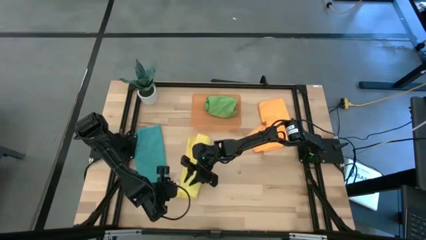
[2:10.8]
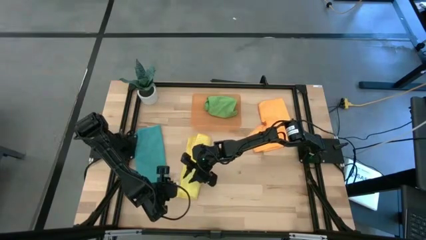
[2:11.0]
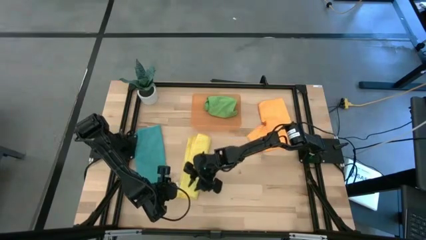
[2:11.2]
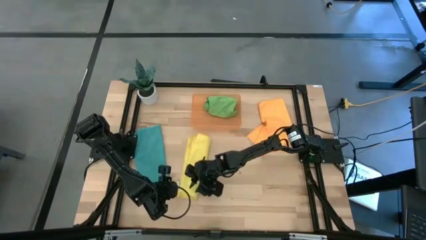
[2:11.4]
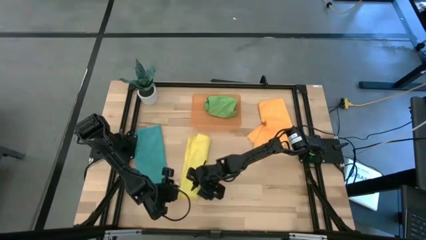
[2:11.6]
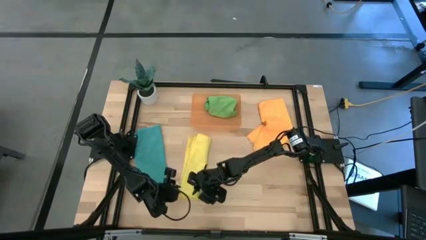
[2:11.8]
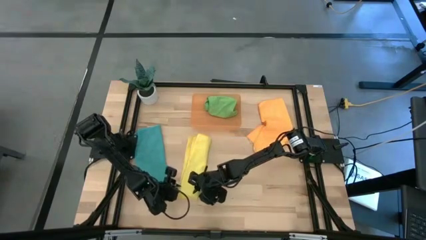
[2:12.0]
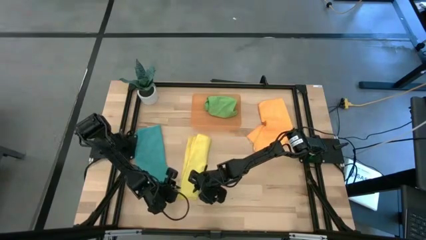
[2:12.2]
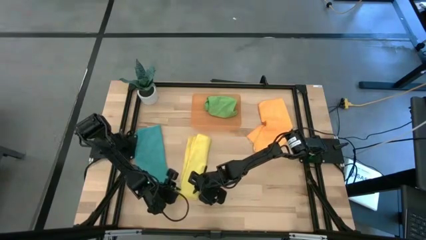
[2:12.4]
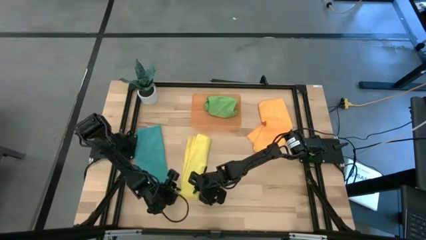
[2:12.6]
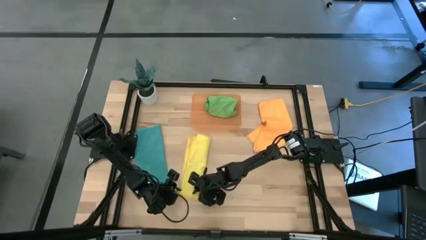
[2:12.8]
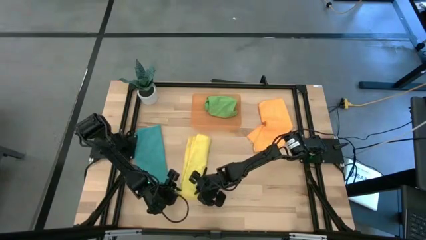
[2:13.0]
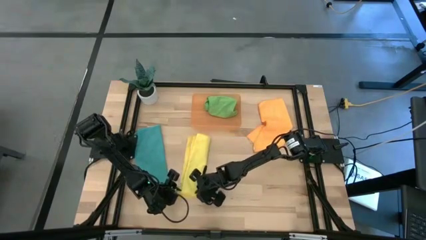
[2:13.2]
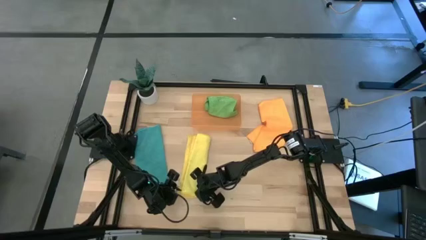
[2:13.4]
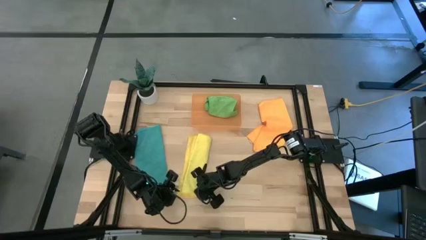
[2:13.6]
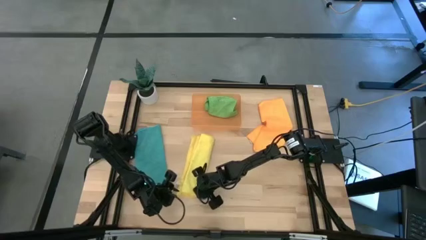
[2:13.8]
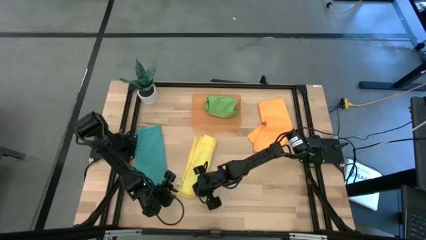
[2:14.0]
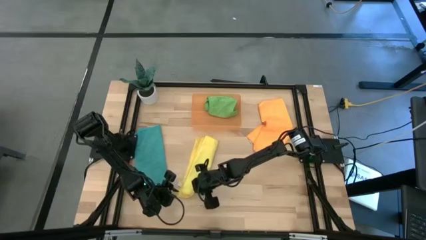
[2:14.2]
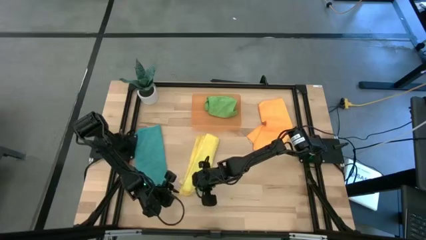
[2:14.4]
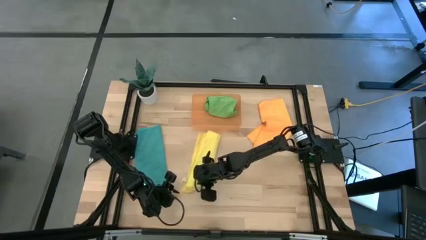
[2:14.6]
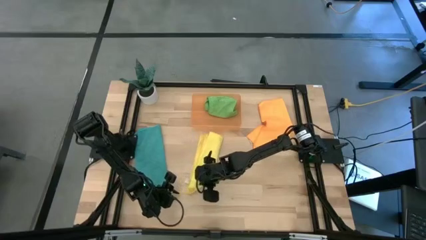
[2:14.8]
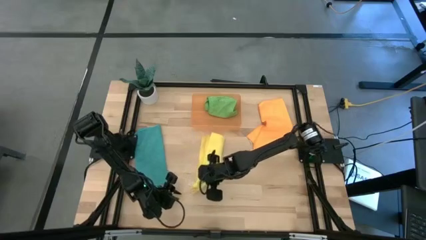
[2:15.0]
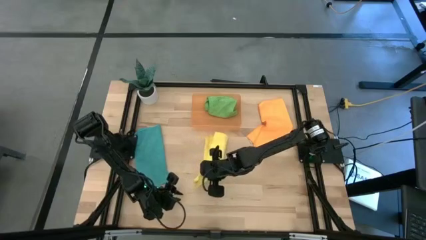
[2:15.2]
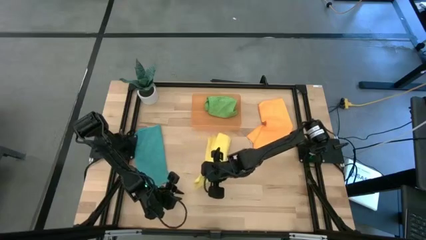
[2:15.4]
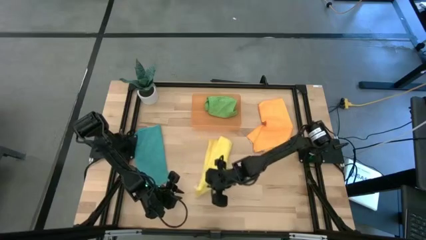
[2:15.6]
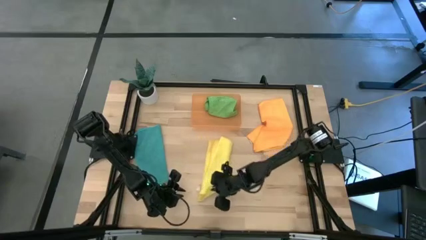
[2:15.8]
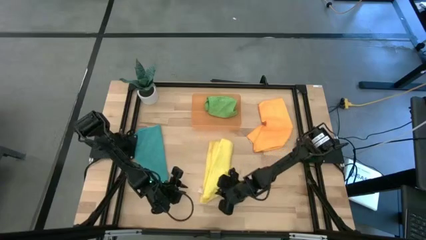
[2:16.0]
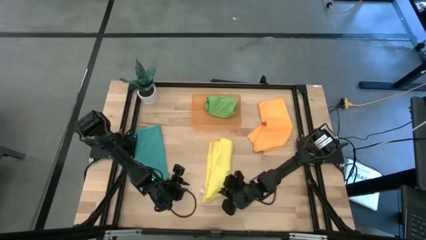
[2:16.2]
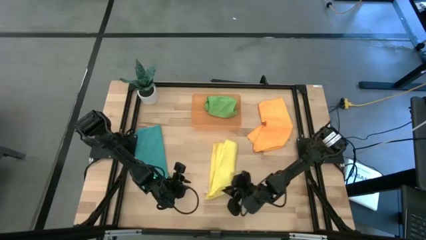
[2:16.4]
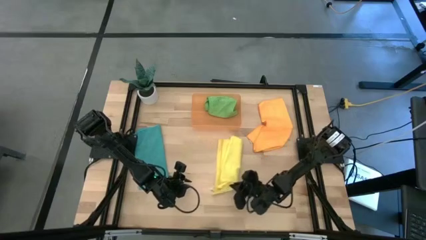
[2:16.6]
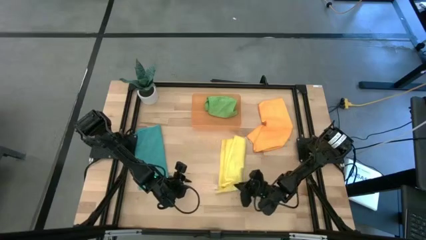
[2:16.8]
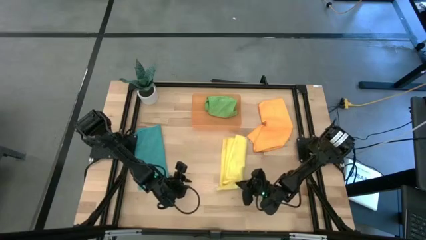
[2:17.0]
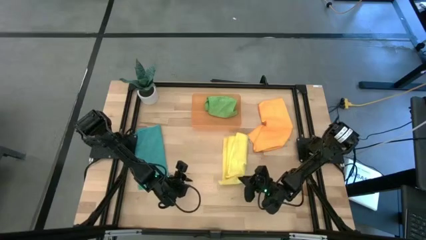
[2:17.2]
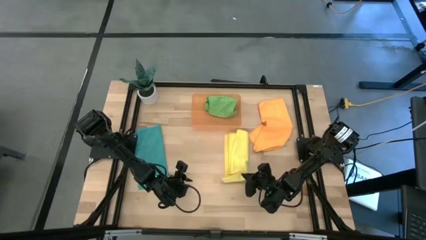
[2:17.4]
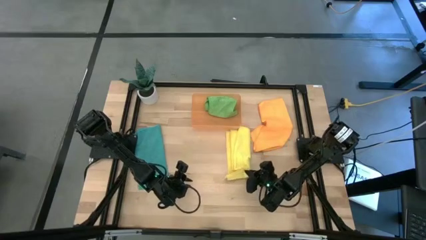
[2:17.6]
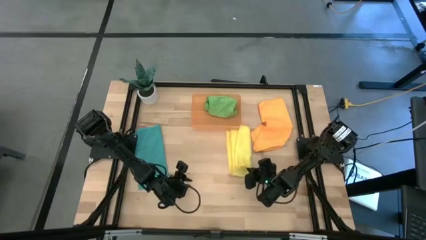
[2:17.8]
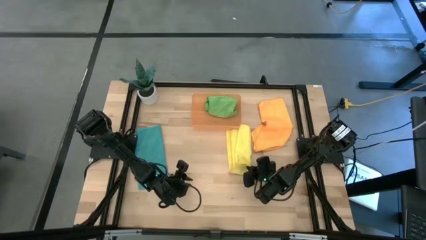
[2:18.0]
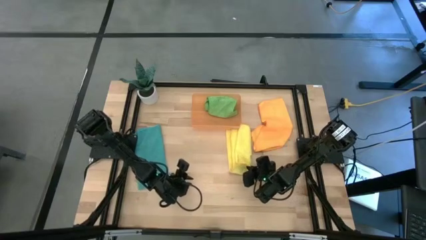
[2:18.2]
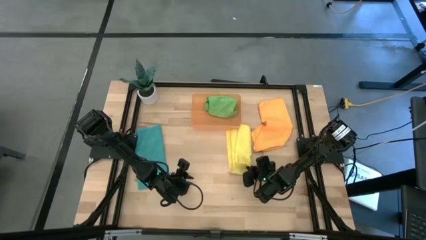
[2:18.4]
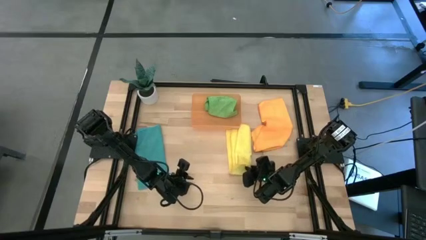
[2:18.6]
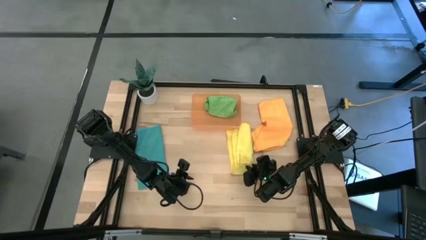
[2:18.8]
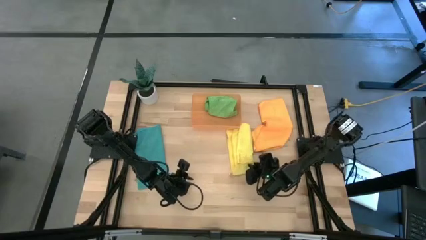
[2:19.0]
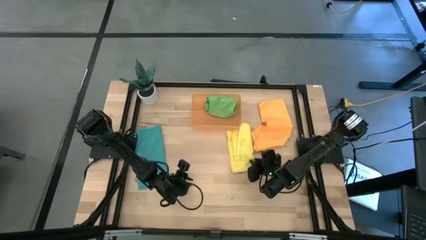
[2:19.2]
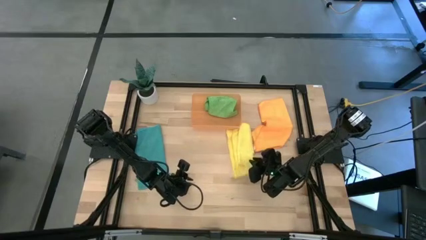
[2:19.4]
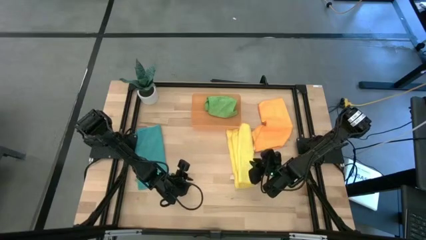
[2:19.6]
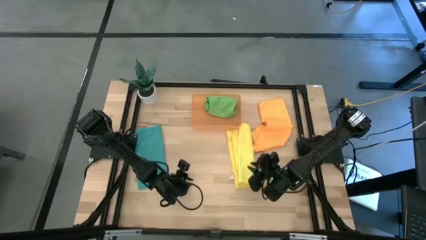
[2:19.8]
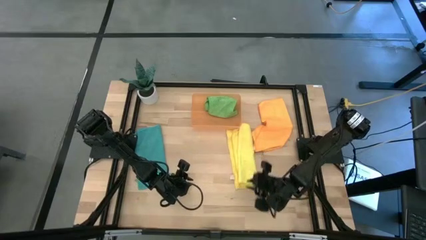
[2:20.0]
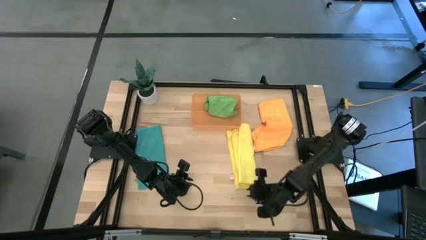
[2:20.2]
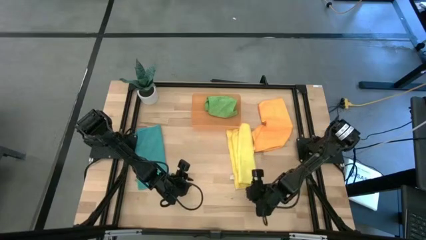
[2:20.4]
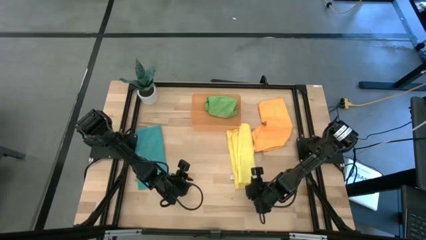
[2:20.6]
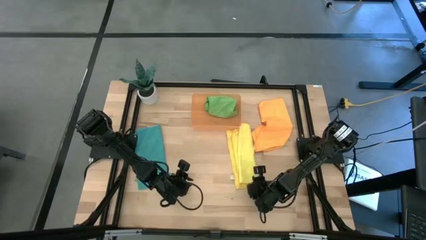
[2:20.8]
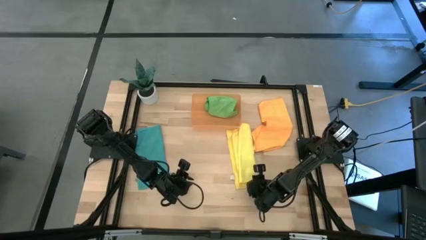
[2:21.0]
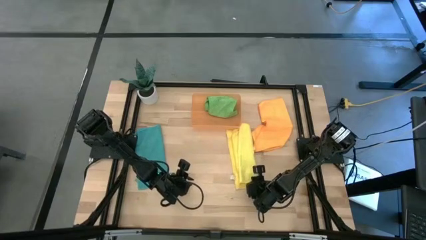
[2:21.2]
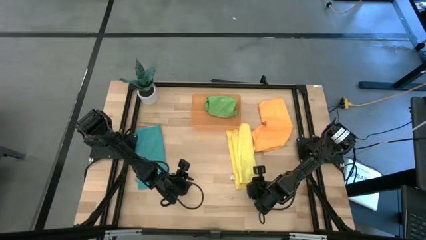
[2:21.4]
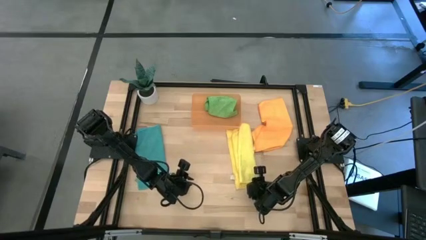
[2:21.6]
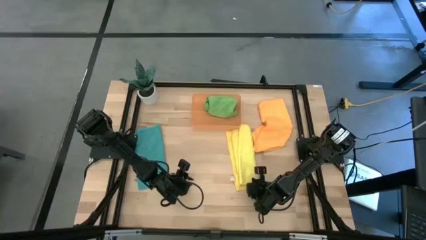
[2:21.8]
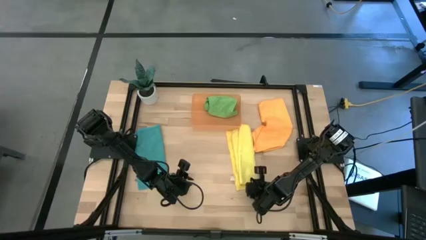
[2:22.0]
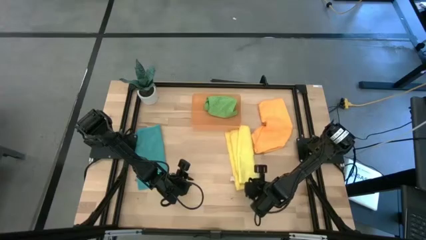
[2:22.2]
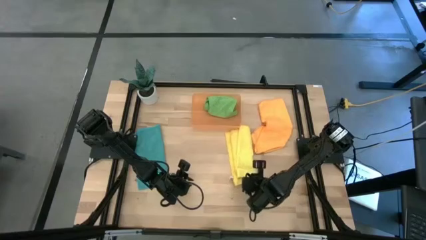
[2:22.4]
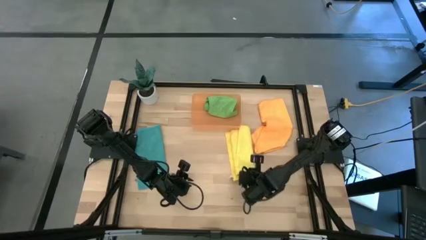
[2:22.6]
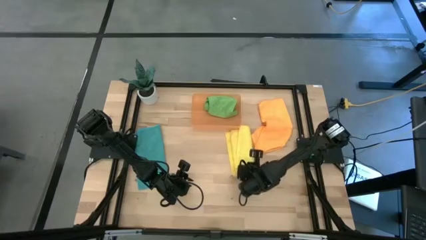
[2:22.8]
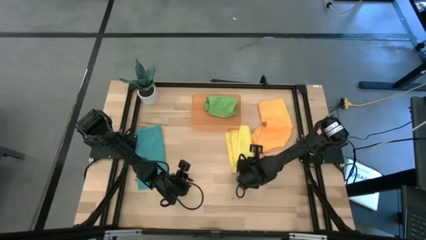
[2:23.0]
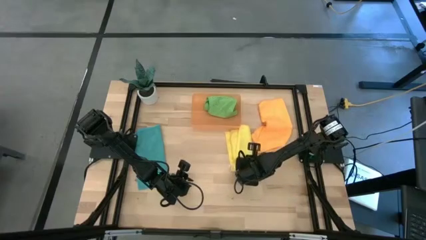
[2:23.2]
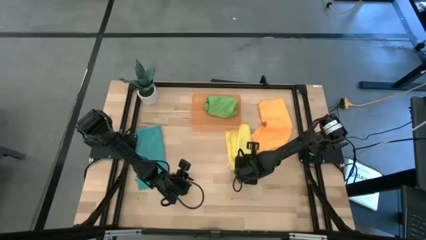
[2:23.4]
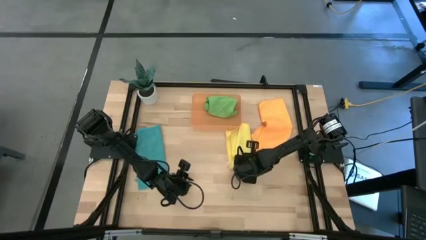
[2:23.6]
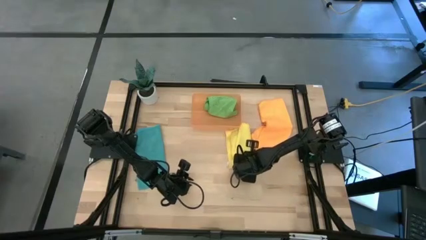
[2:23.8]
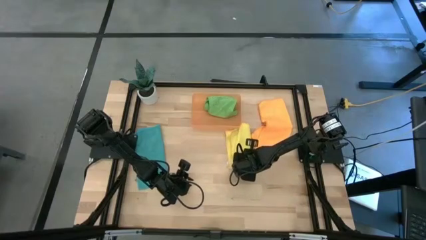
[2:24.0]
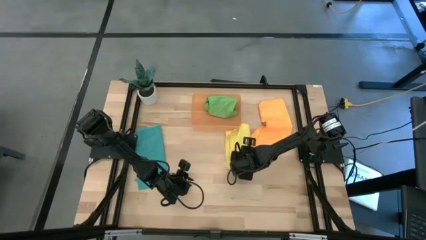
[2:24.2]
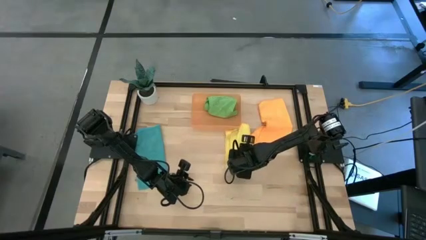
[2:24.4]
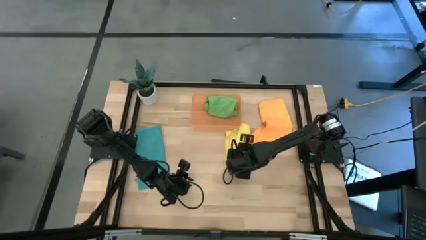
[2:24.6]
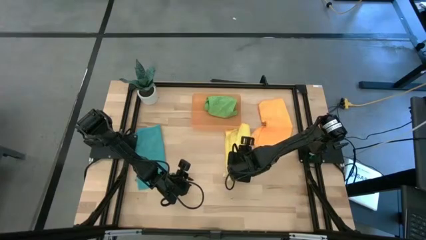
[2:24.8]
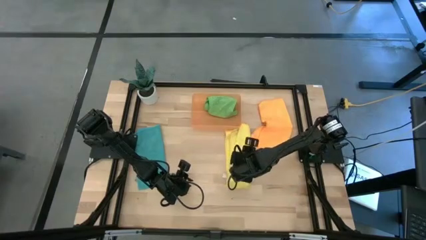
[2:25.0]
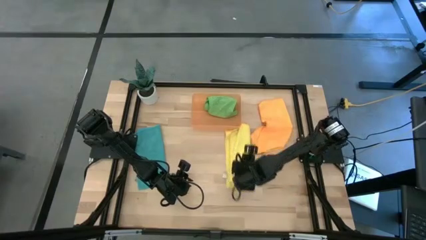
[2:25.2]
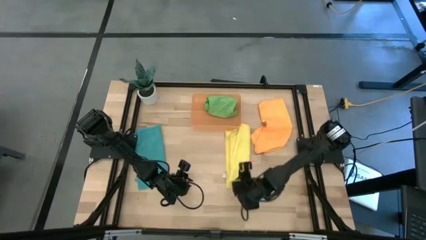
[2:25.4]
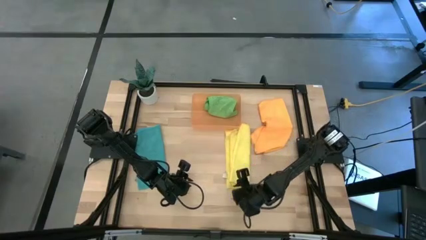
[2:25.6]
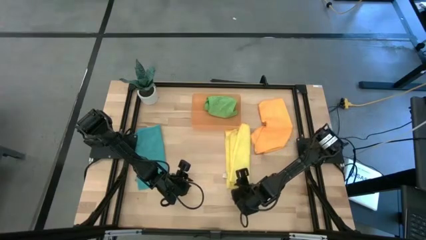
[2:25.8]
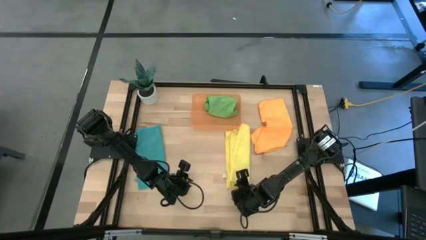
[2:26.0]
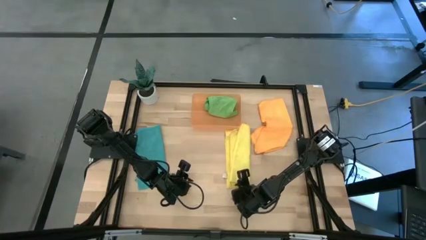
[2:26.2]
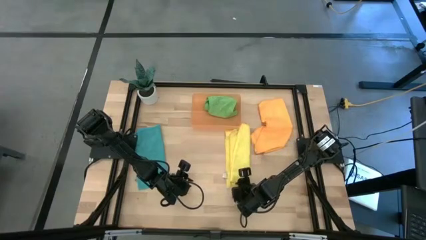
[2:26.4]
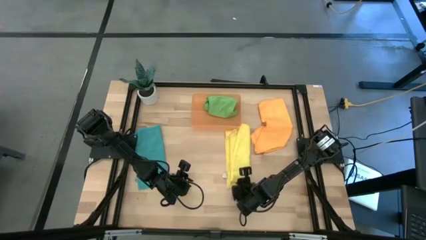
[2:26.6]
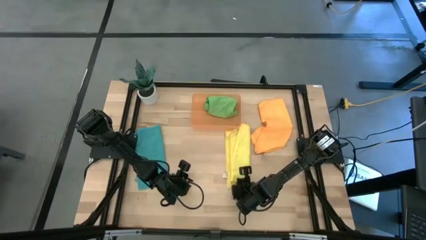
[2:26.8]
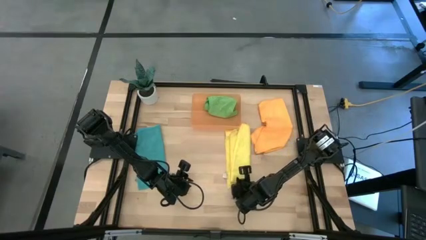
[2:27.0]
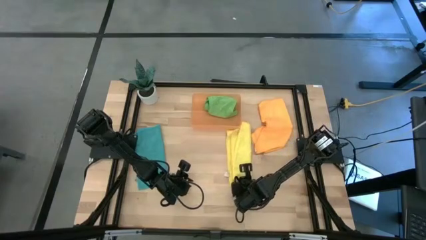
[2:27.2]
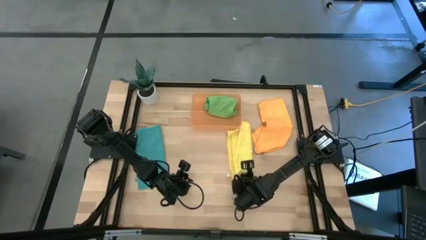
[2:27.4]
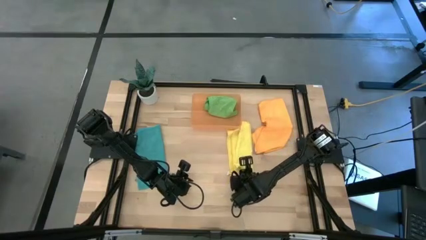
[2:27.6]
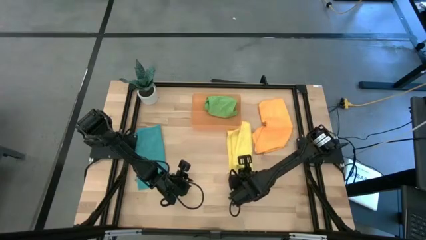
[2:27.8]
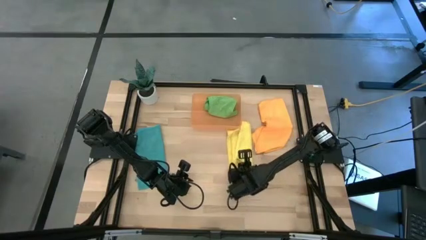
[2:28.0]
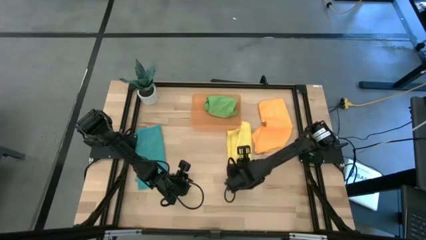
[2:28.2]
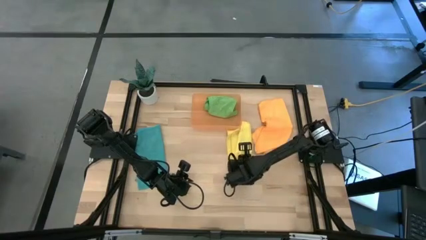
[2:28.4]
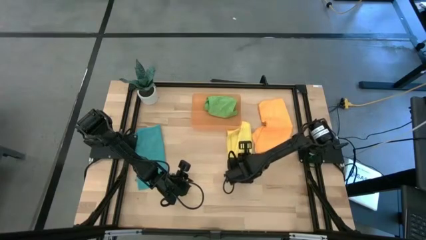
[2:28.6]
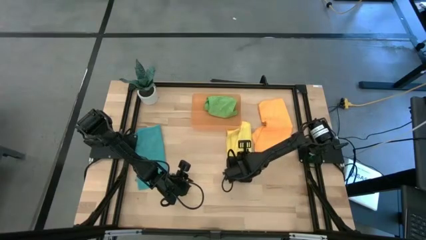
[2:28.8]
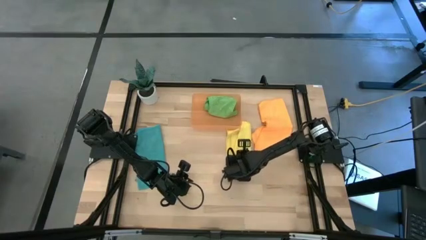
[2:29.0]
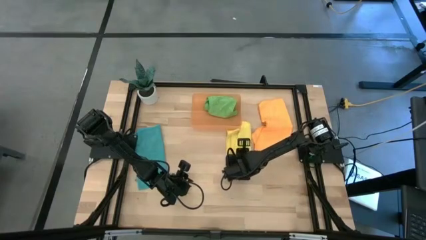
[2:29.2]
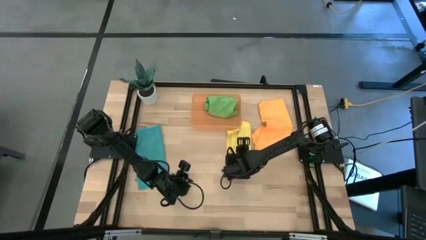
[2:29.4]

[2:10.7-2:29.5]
Task: Roll microfiber towels into tight, uniform cylinder then place into a basket
Roll the yellow microfiber cloth
